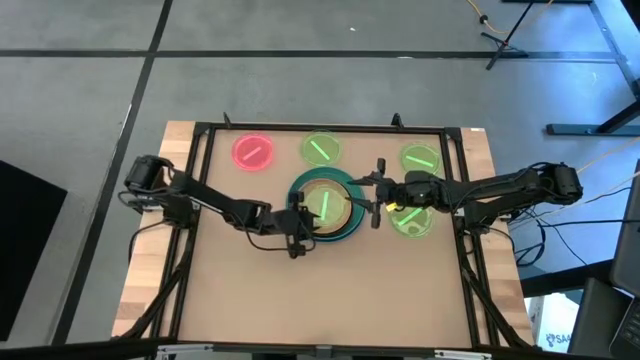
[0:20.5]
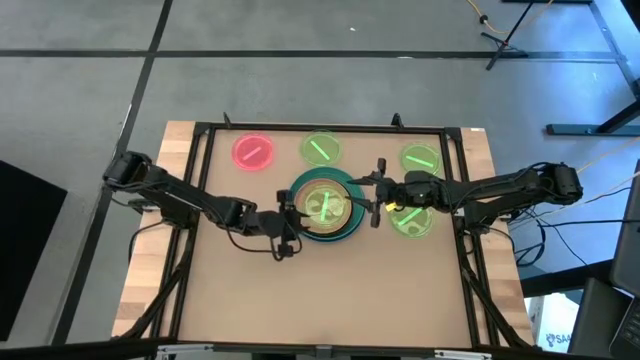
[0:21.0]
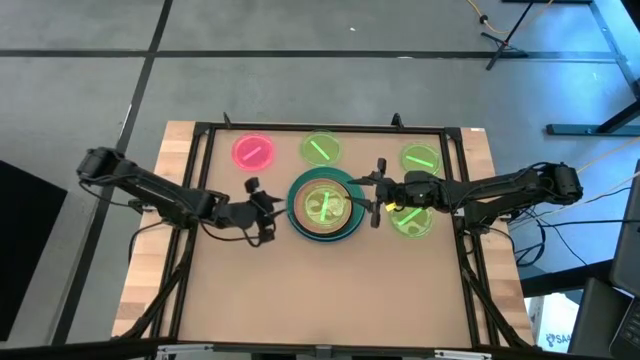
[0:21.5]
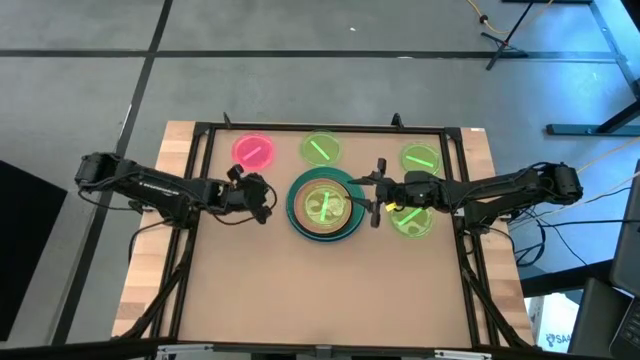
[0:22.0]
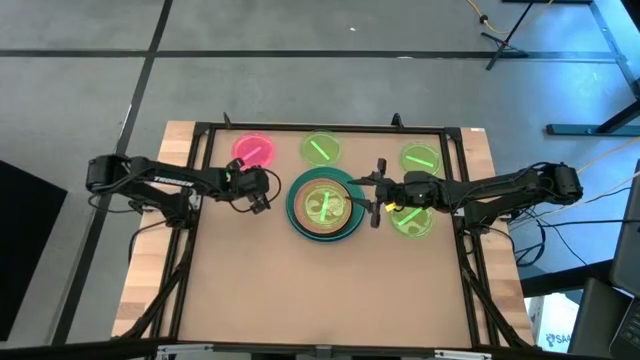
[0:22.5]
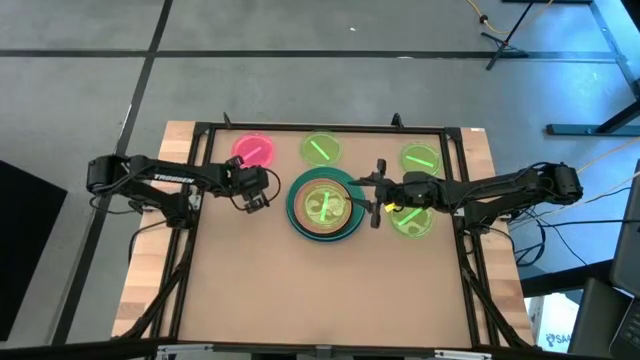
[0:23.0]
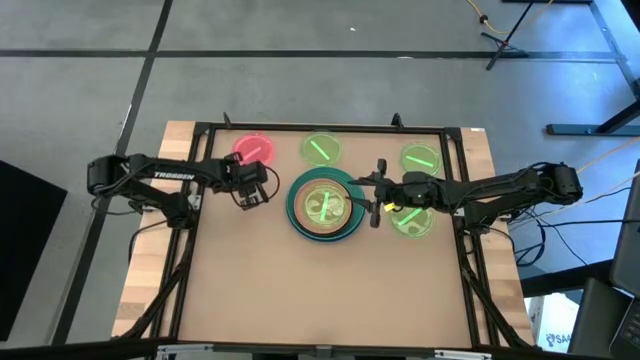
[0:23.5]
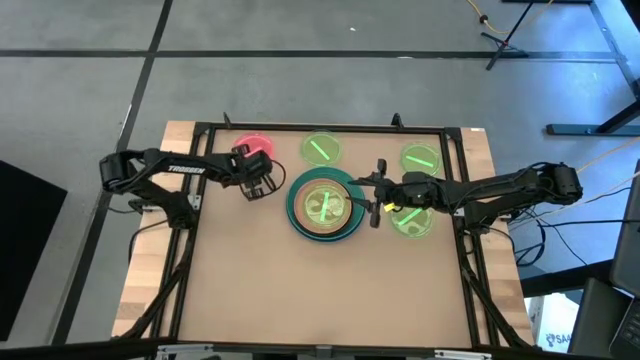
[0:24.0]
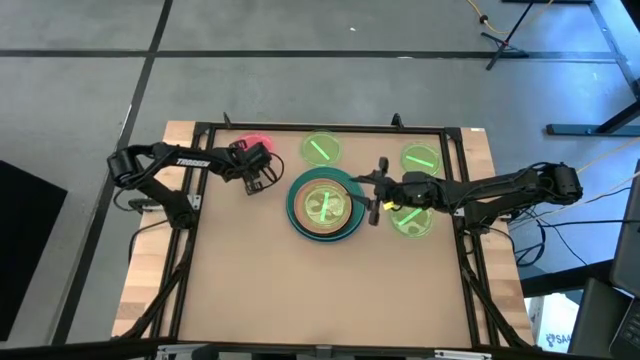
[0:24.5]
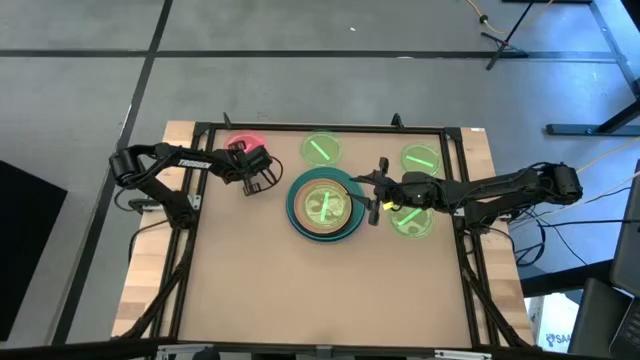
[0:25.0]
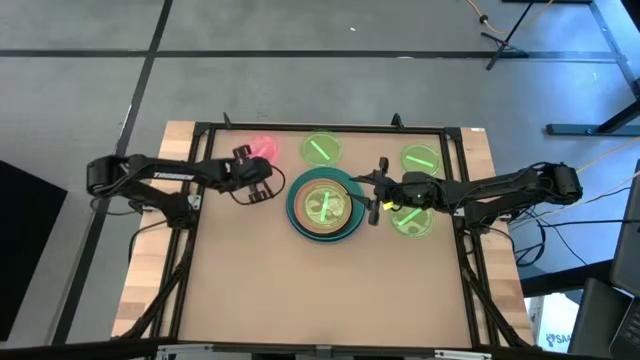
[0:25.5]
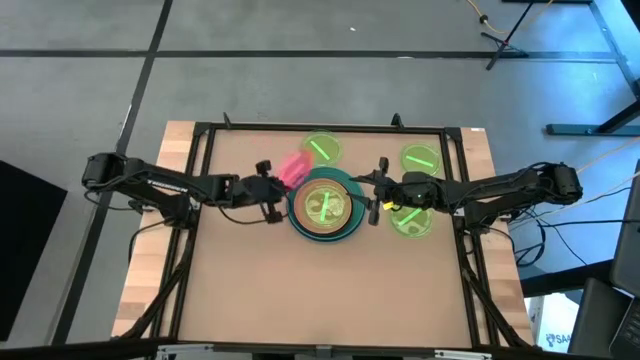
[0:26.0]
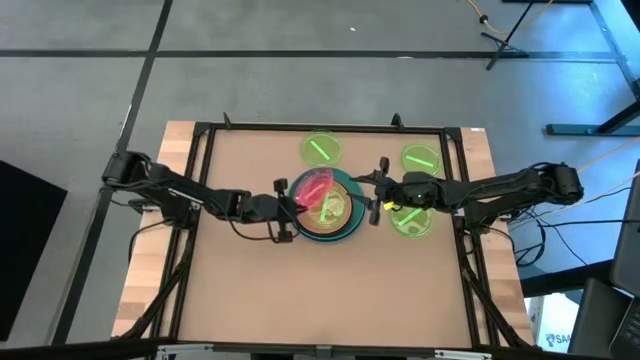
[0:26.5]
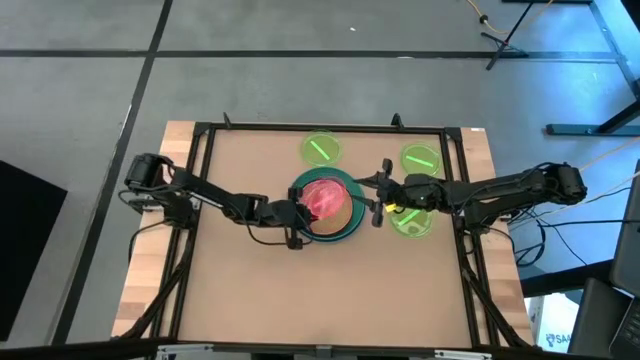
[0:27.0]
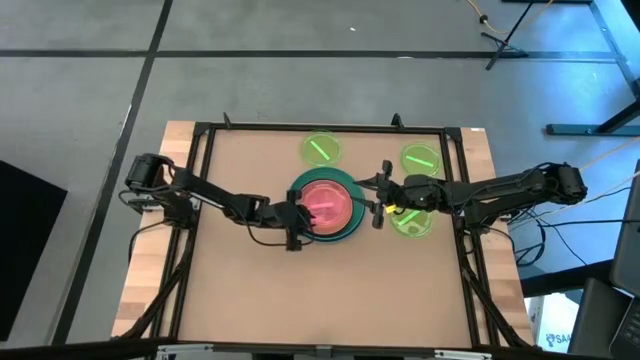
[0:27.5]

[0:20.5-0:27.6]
Task: Stack plastic plates
Stack the pink plate on top the light green plate

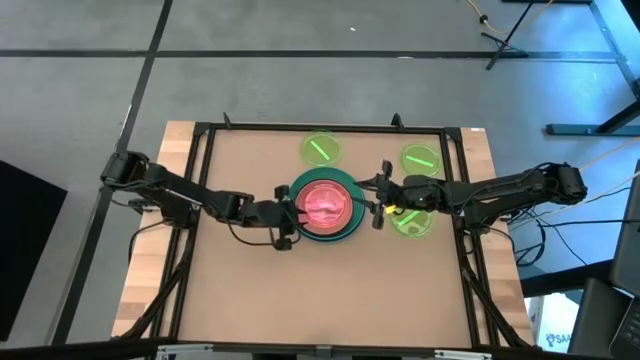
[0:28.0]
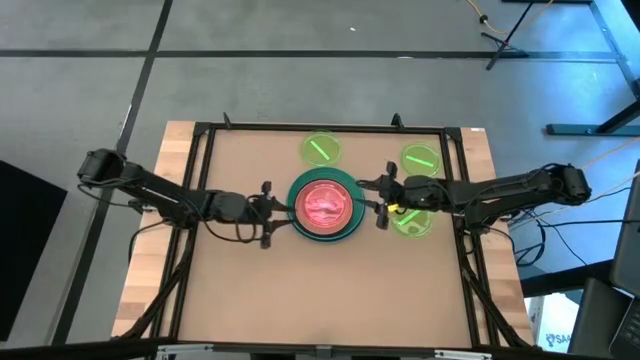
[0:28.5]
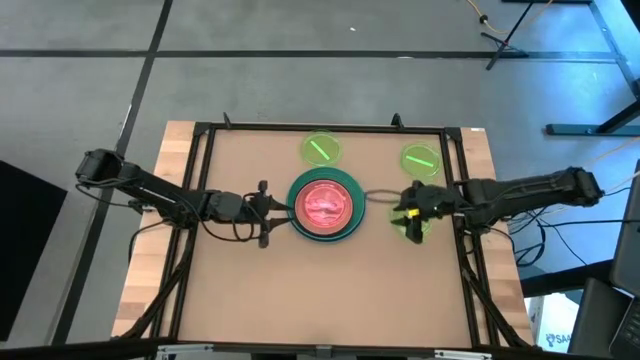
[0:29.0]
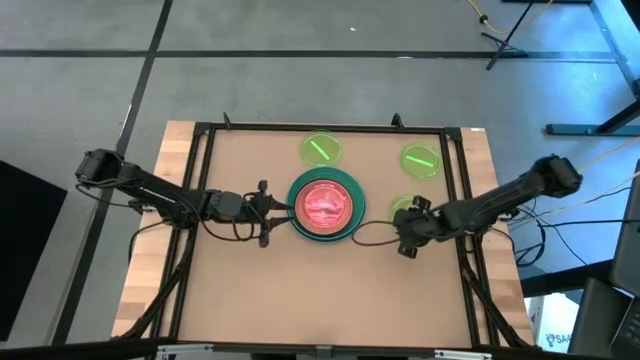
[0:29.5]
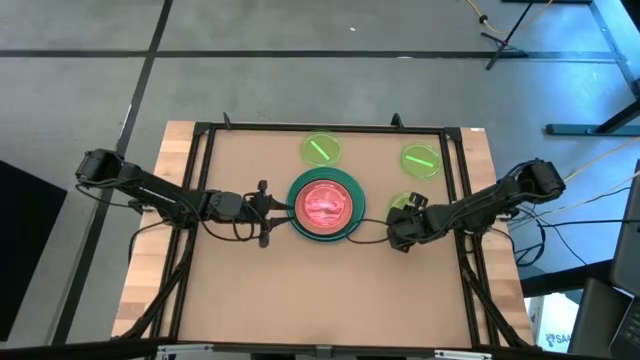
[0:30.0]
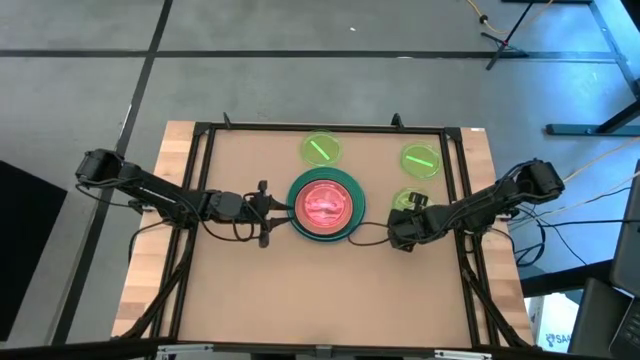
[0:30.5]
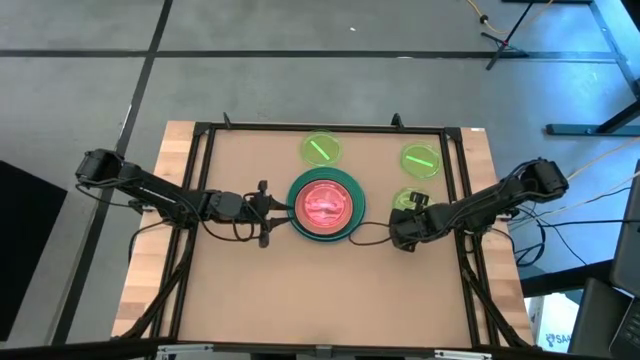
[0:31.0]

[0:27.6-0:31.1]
Stack the light green plate on top of the pink plate

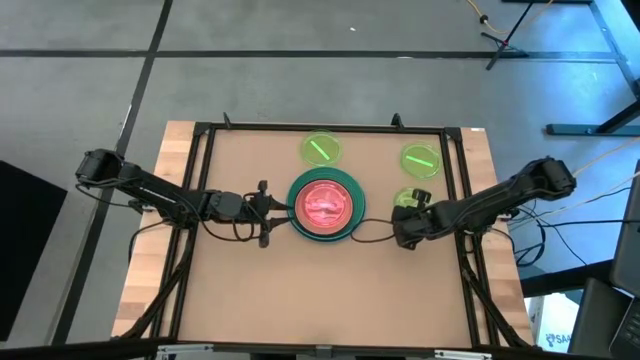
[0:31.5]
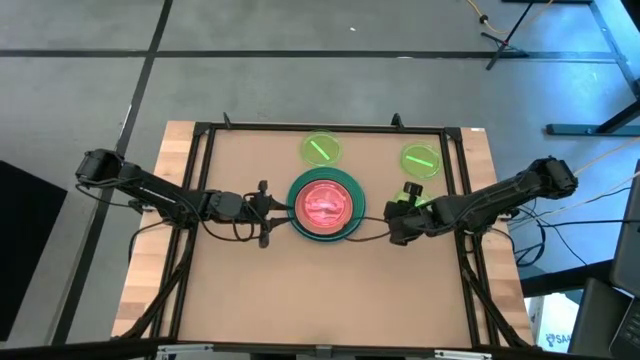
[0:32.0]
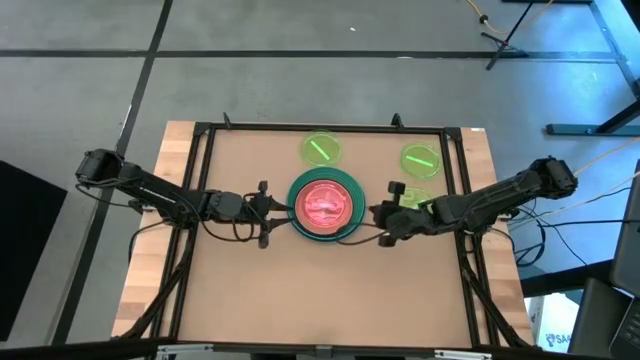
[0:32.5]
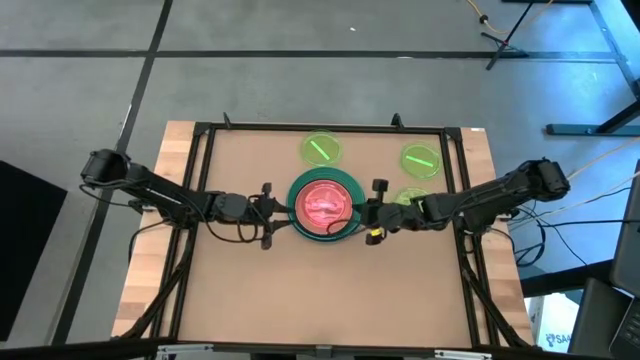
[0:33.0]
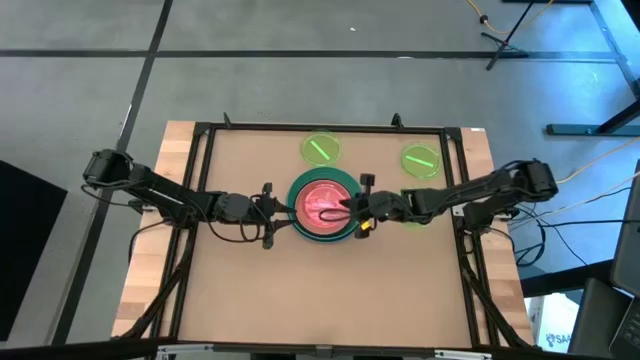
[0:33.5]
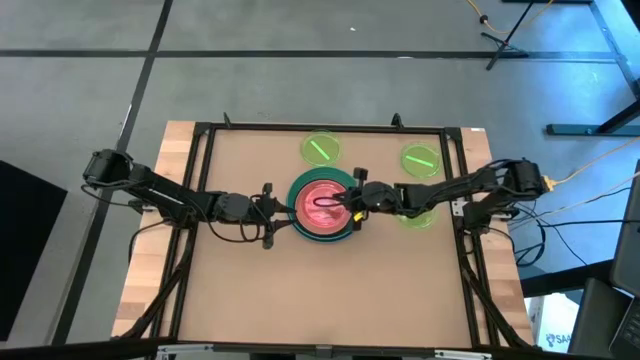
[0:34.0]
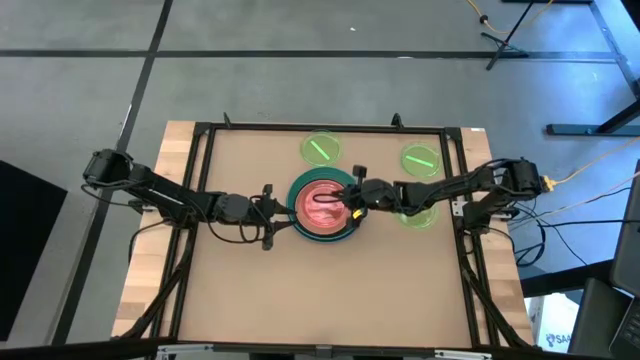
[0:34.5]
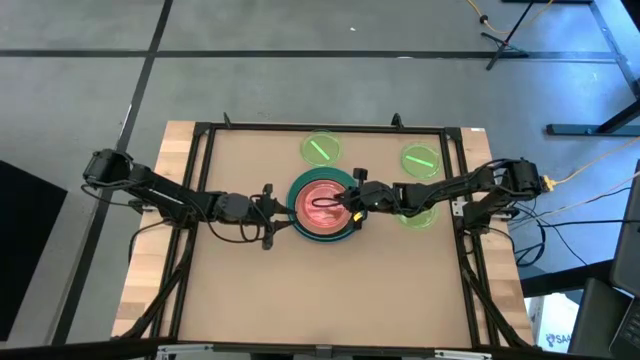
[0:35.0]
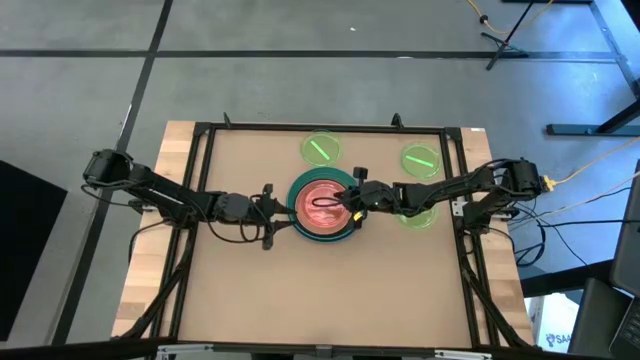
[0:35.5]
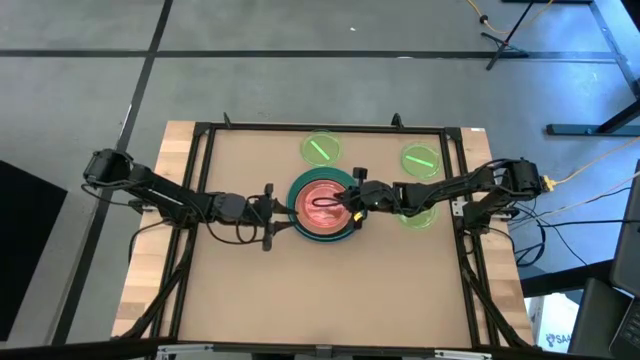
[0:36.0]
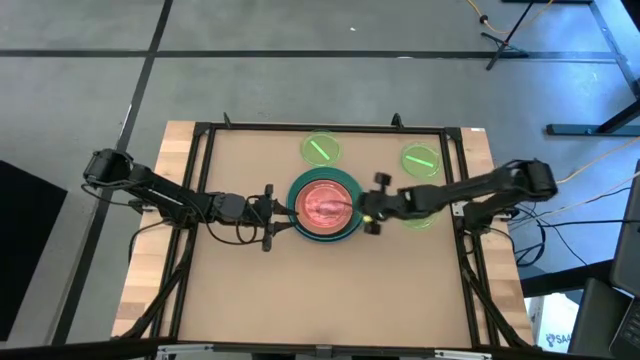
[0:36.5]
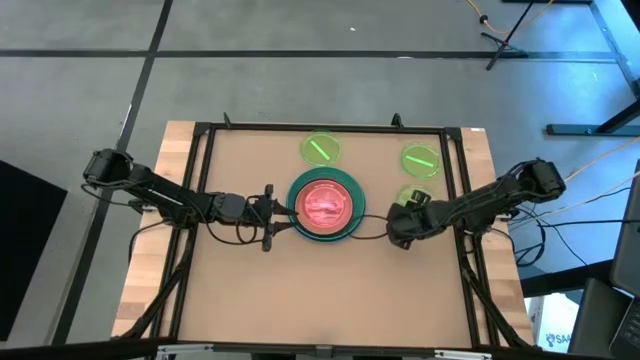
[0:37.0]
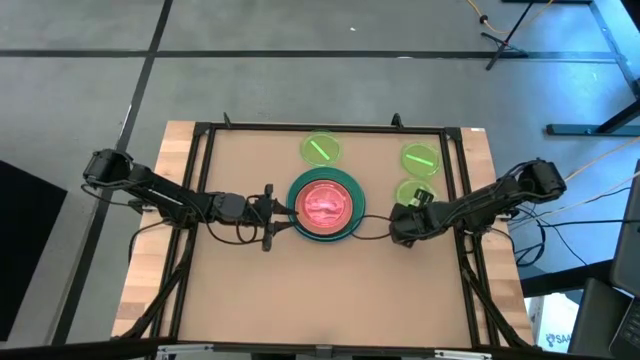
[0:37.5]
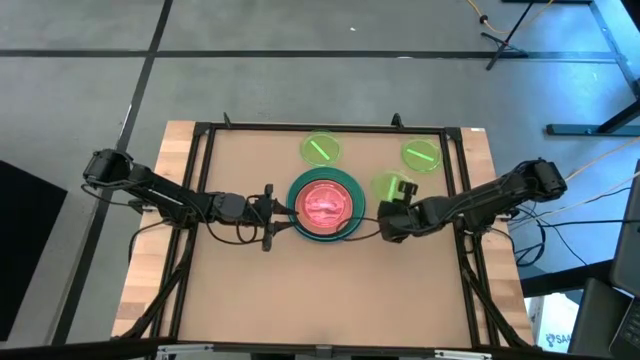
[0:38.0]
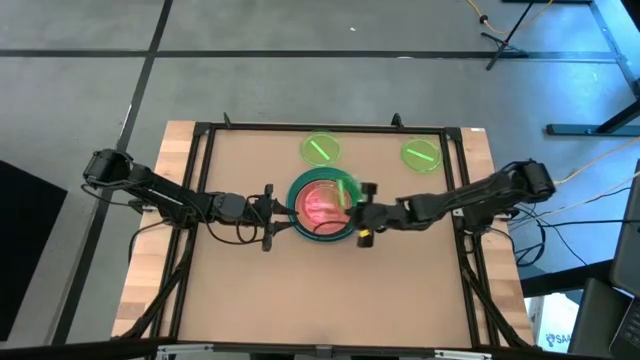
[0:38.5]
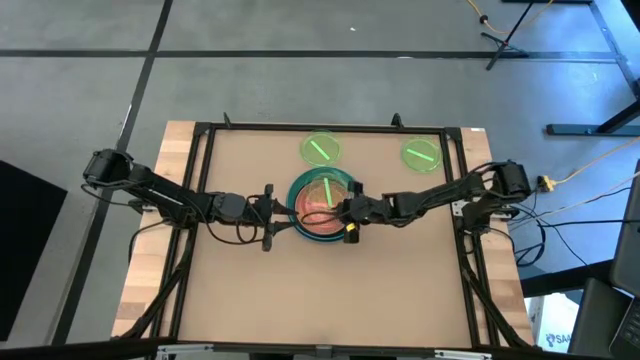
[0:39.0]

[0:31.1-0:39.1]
Stack the light green plate on top of the pink plate

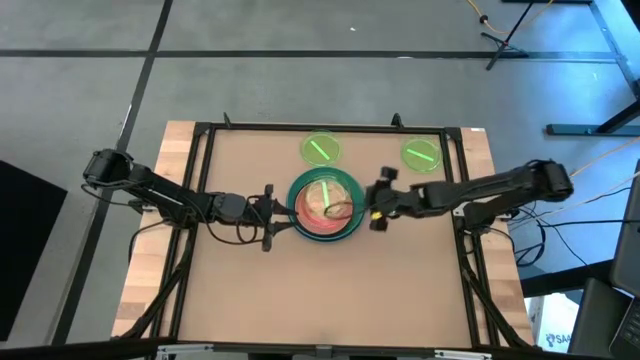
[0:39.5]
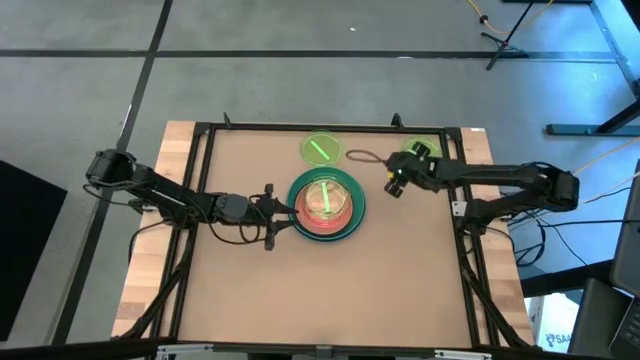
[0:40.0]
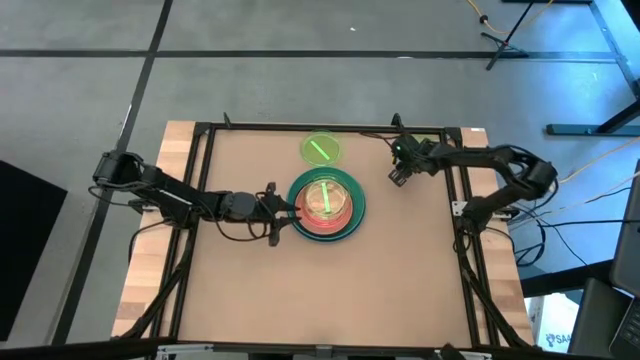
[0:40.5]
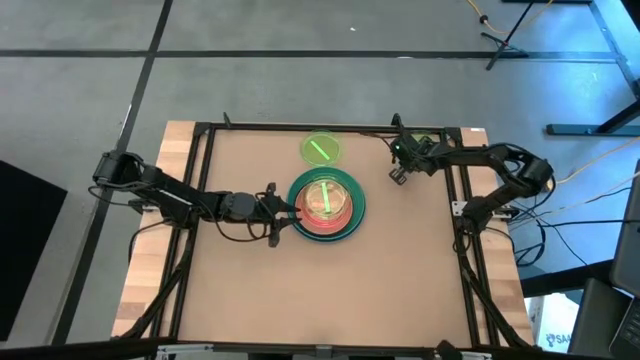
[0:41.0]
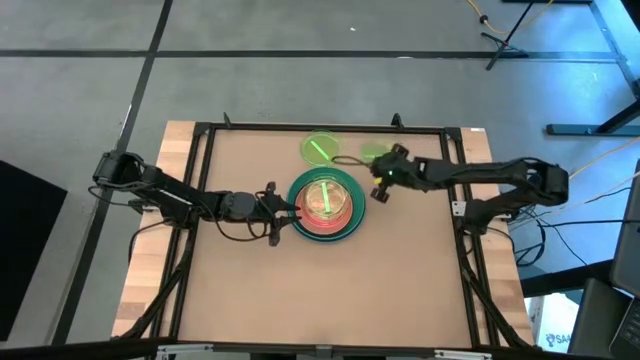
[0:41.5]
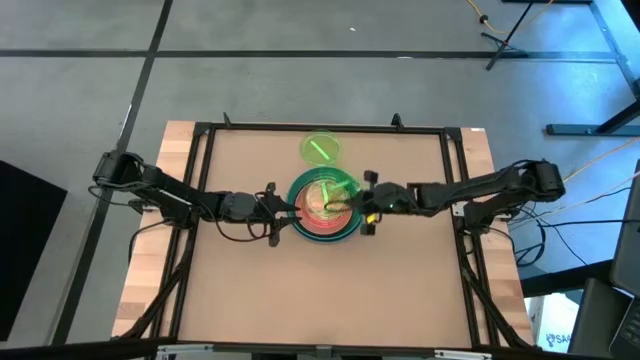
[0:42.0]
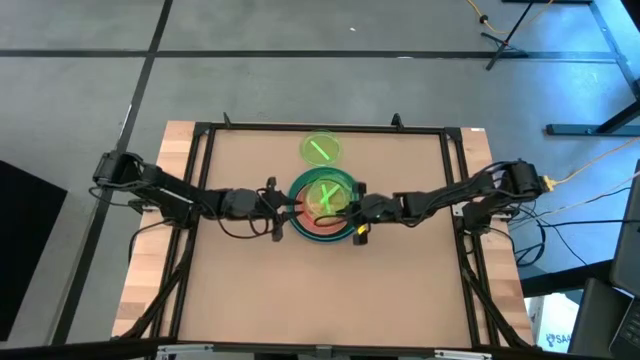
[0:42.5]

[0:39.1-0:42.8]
Stack the light green plate on top of the light green plate
